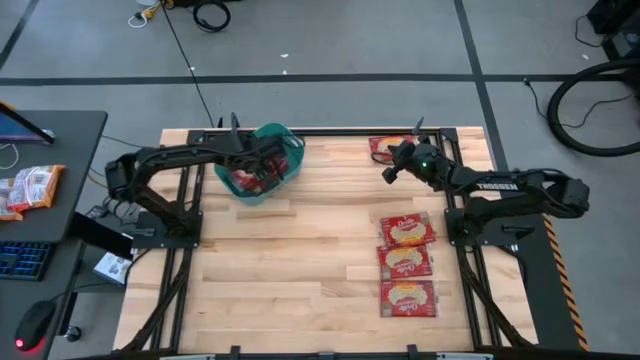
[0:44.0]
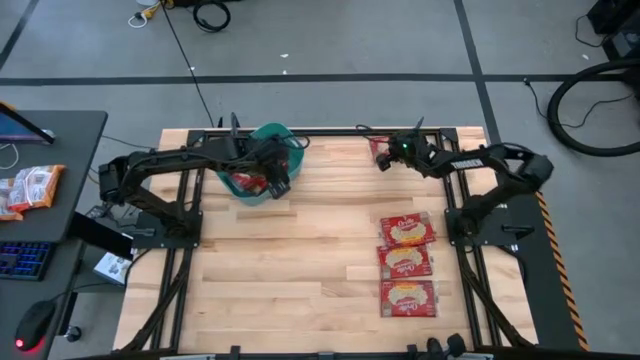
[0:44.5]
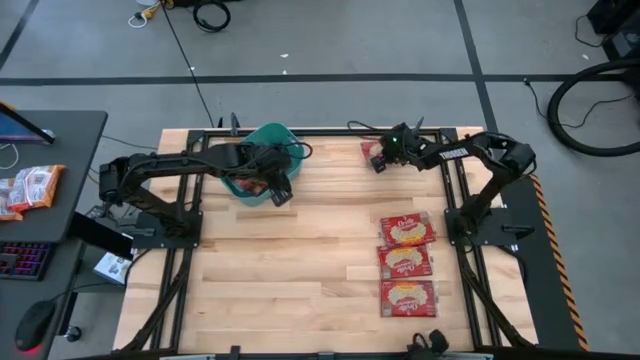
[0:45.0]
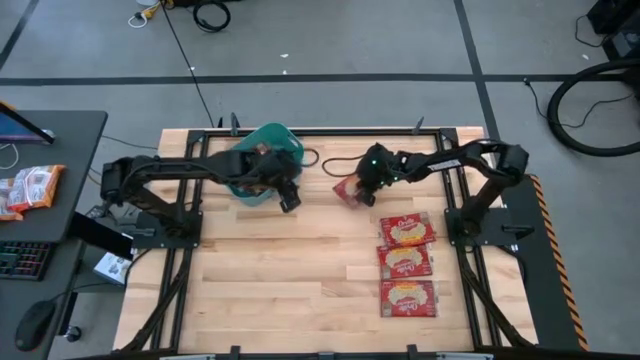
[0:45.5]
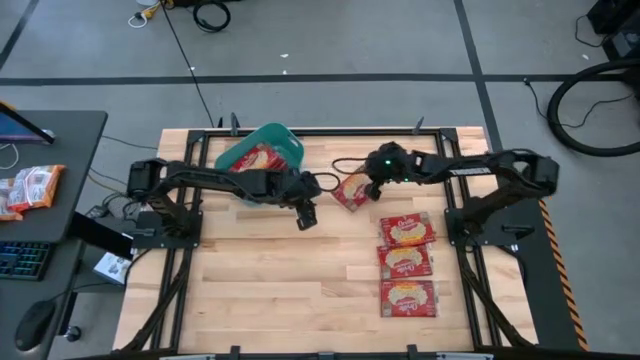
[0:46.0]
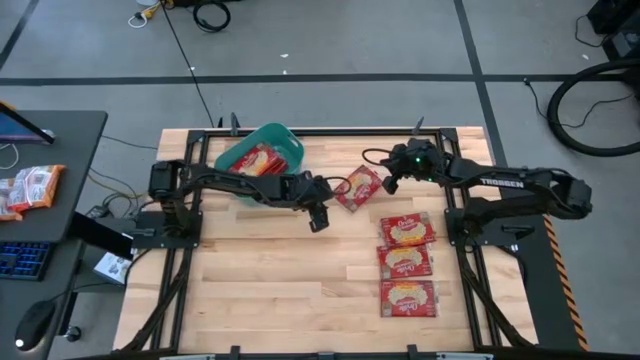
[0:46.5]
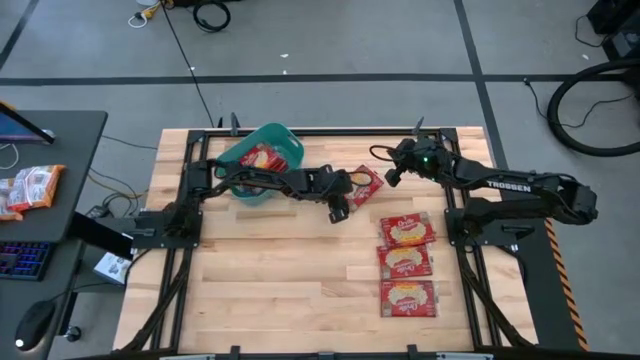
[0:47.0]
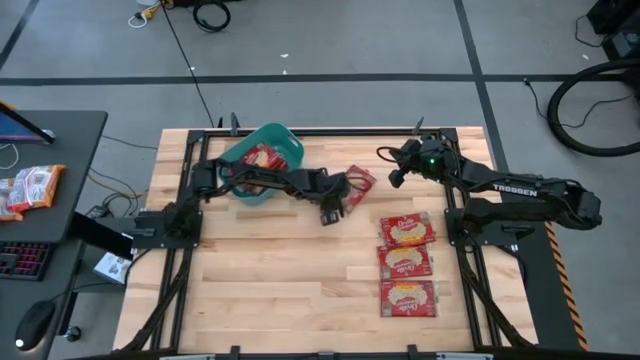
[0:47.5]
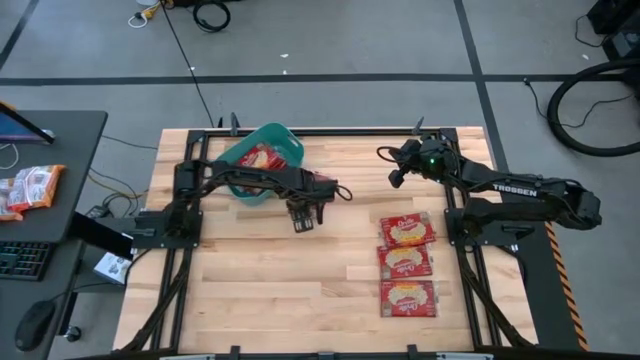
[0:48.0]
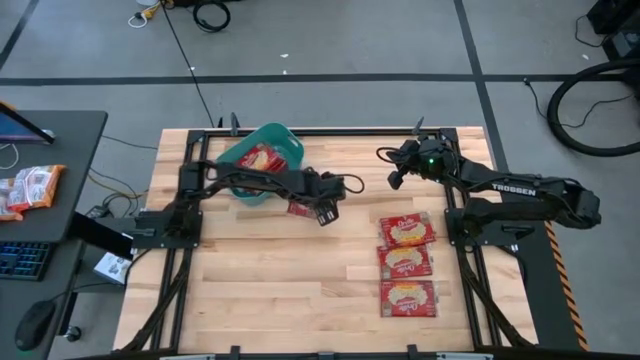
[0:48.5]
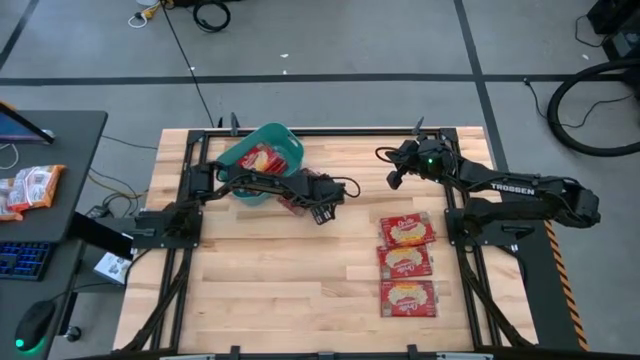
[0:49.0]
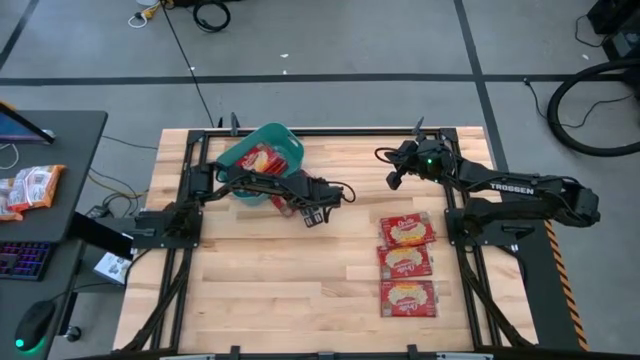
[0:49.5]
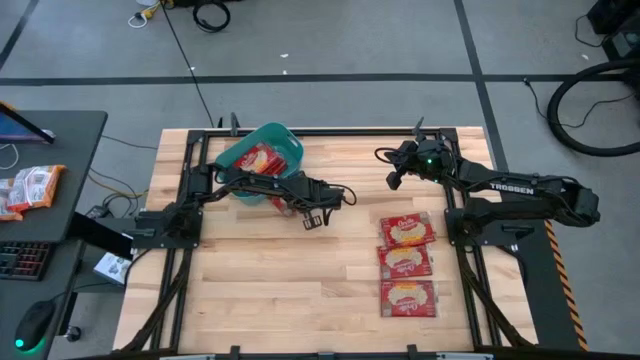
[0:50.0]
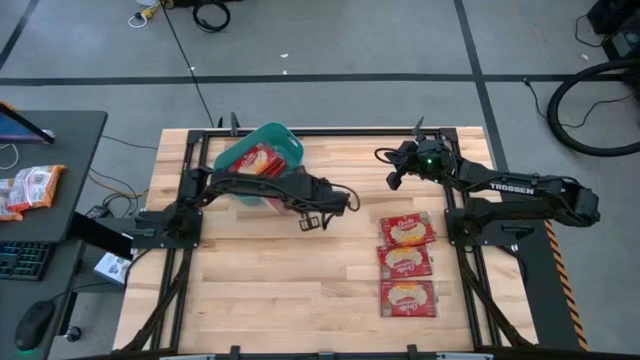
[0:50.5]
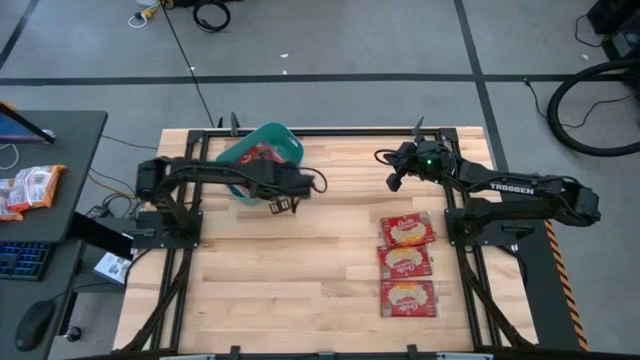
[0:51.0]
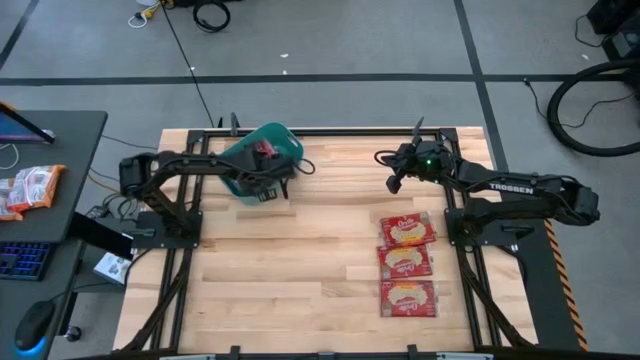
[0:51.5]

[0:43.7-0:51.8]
Task: Sort popcorn bags into baskets
Put the popcorn bag into the bin

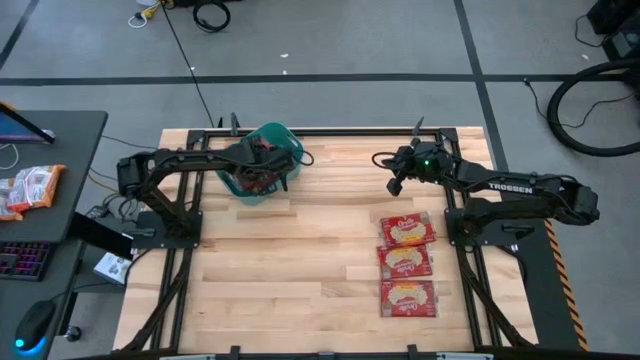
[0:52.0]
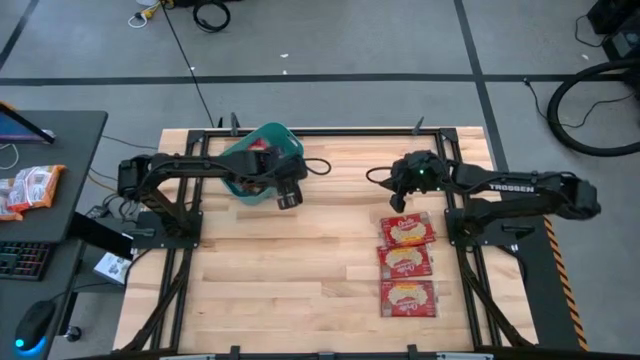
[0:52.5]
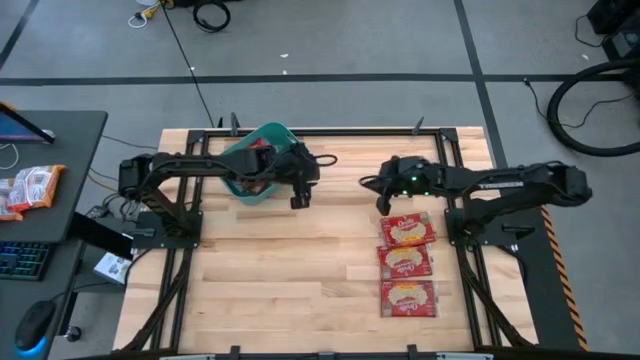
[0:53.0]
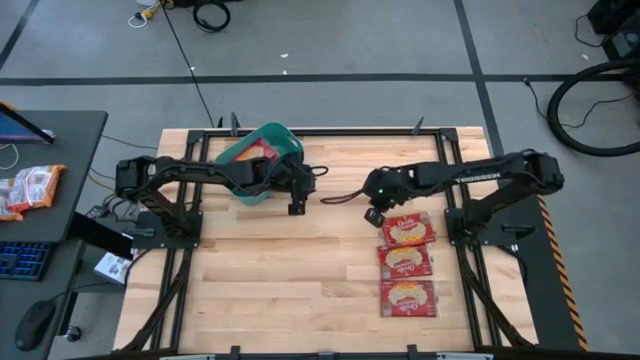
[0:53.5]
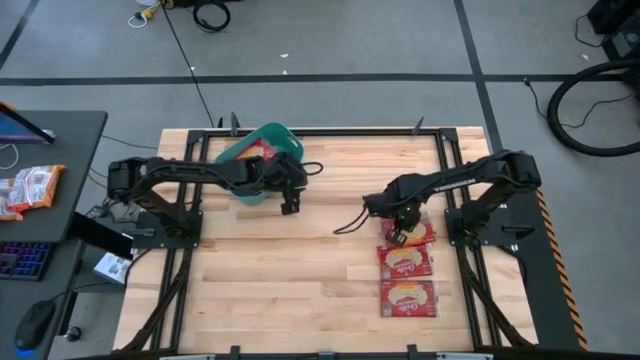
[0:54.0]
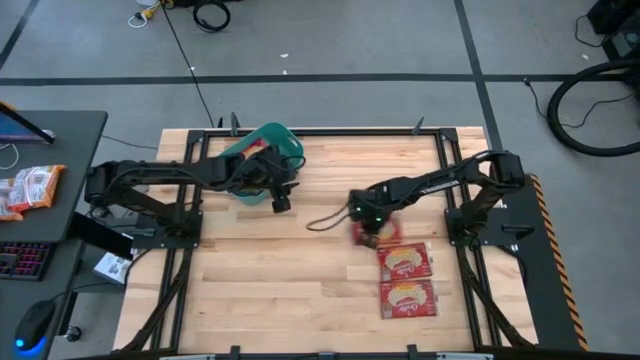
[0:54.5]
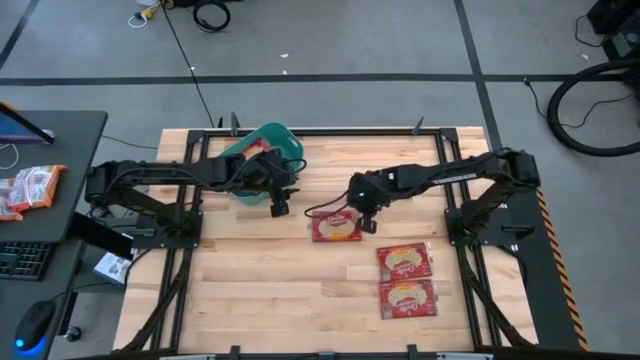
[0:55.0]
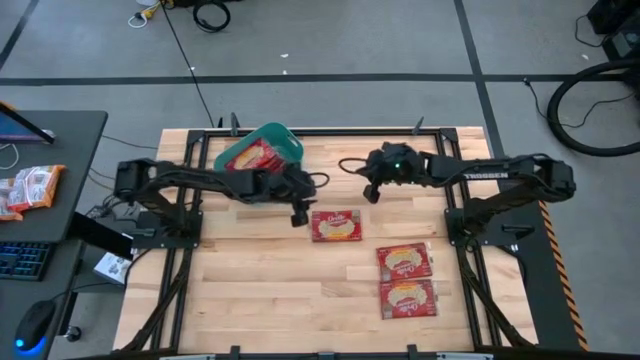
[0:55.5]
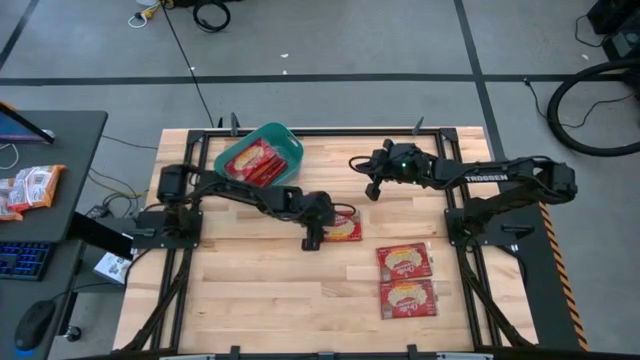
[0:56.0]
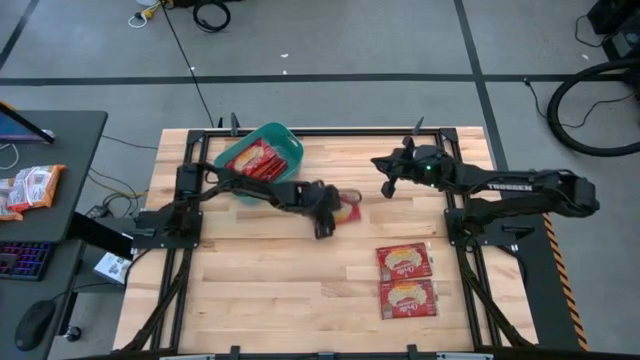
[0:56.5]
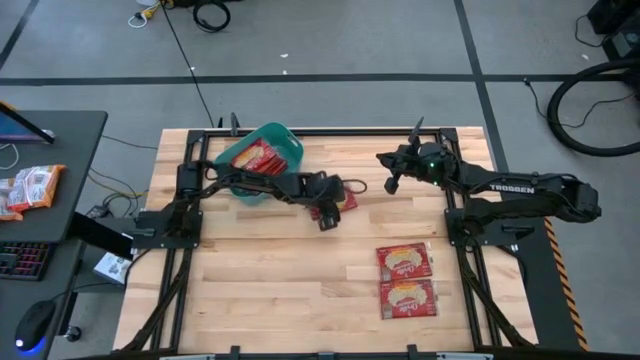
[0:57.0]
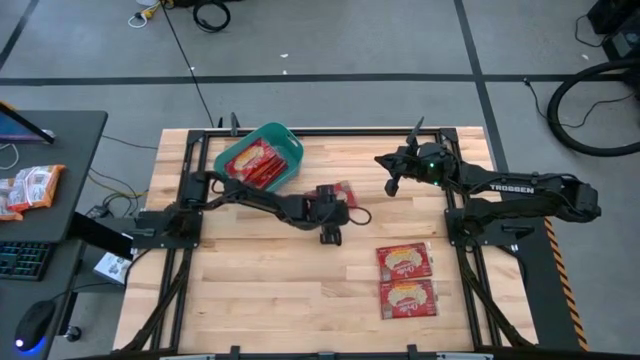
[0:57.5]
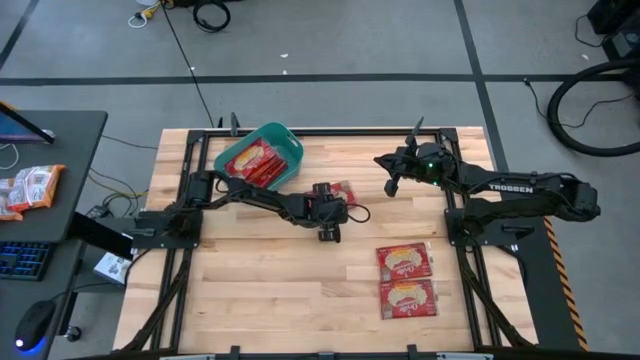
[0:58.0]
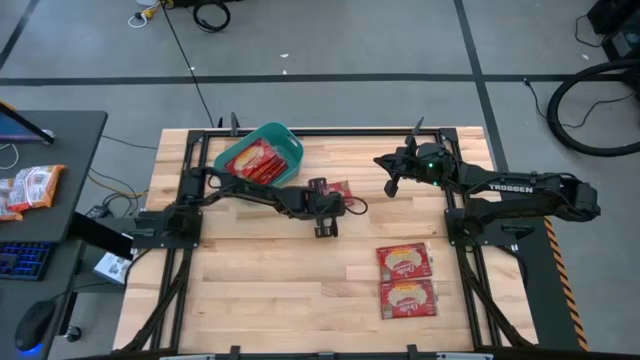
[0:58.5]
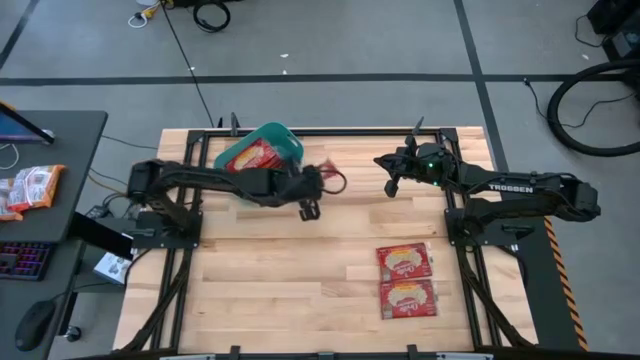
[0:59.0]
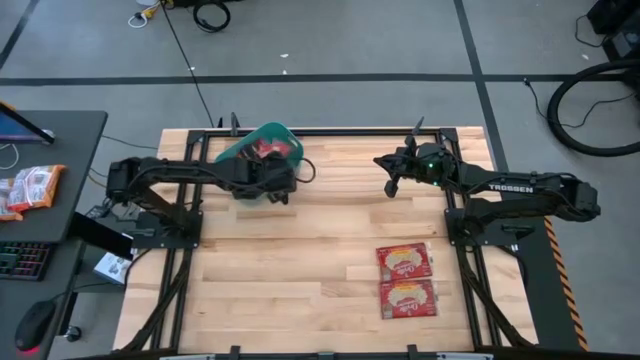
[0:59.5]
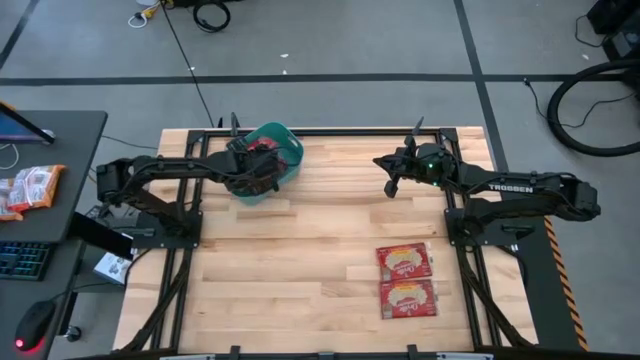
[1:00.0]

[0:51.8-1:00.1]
Put the popcorn bag into the bin

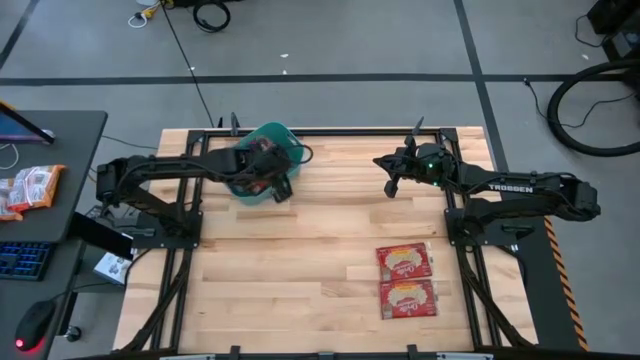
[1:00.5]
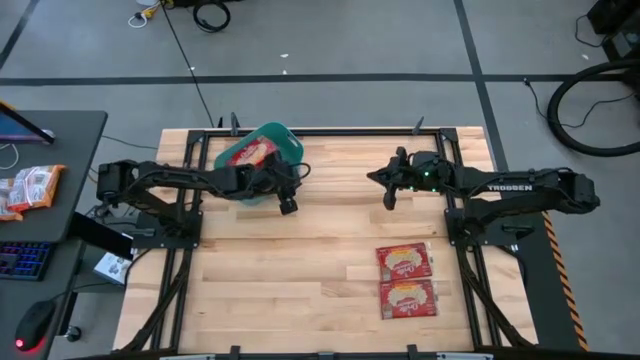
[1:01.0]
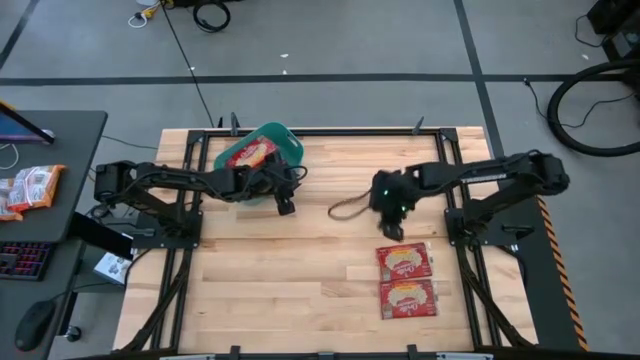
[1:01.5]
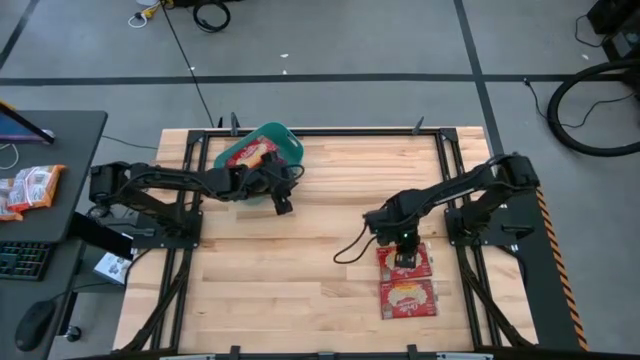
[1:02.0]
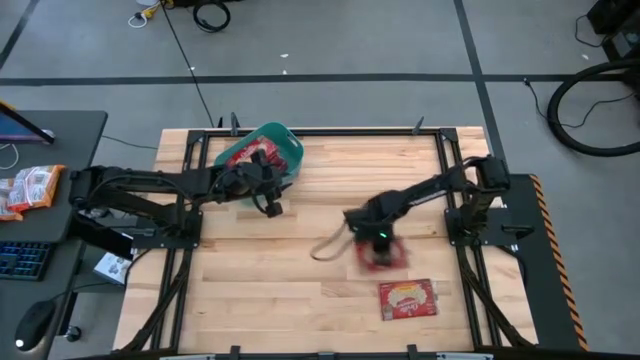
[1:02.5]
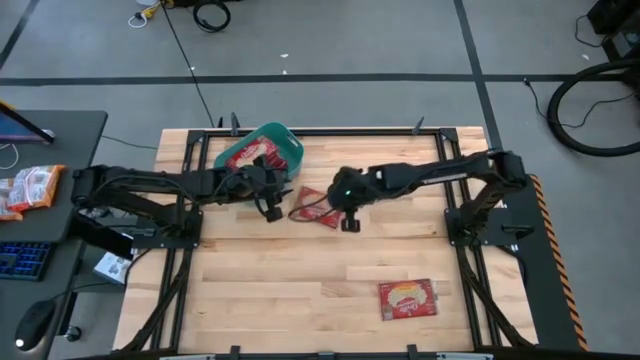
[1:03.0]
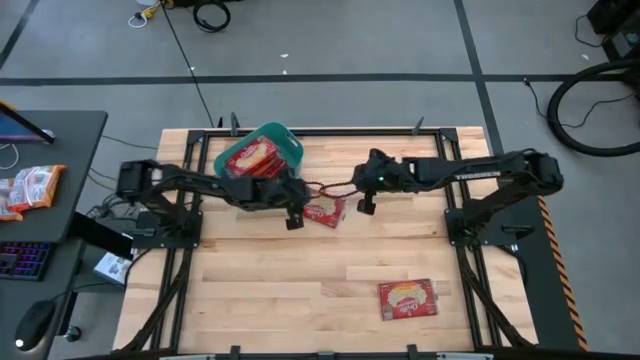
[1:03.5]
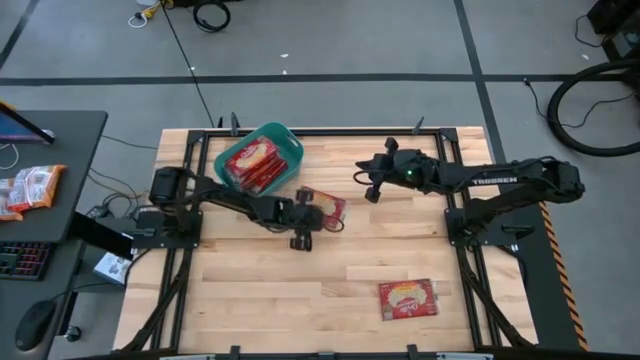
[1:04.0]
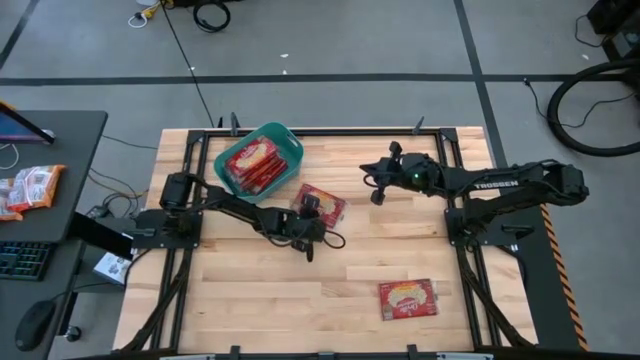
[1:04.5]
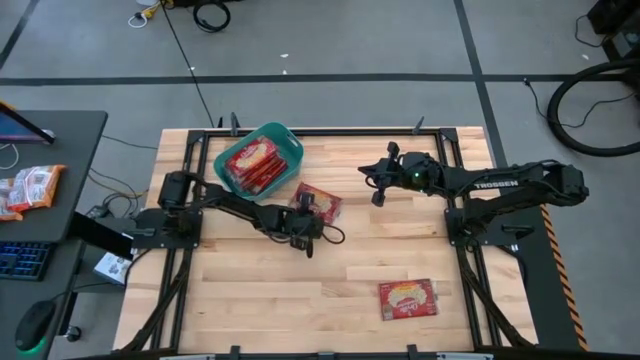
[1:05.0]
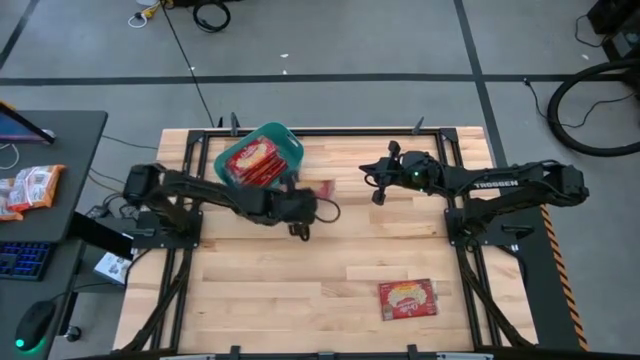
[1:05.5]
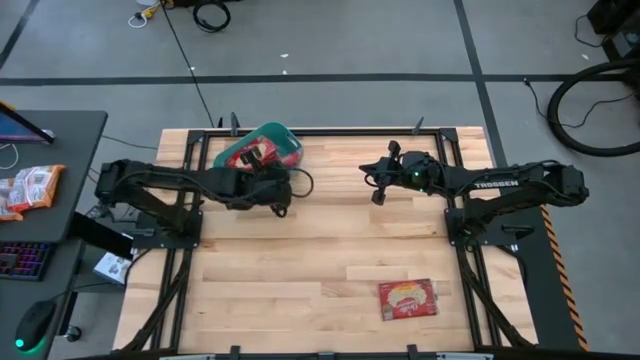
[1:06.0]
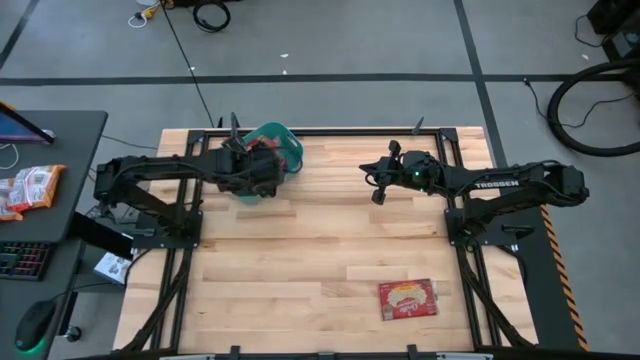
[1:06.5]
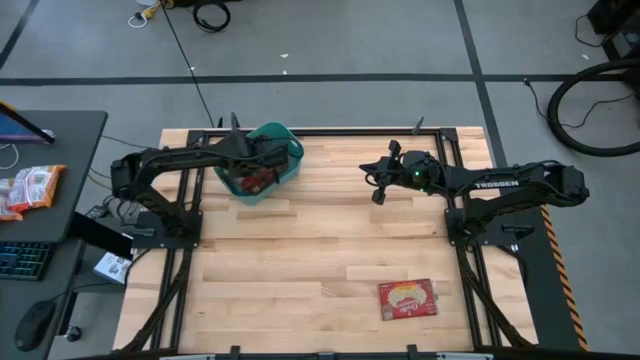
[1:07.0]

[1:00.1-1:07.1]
Put the popcorn bag into the bin
